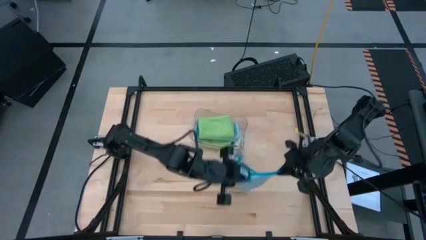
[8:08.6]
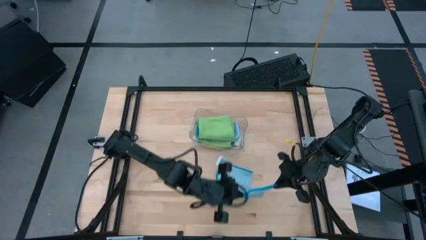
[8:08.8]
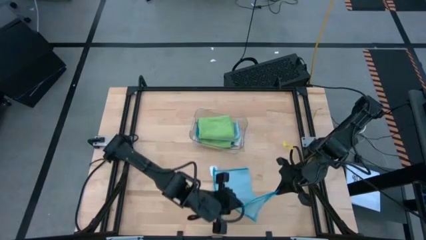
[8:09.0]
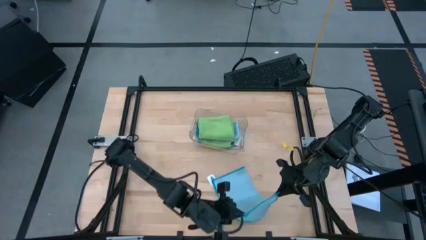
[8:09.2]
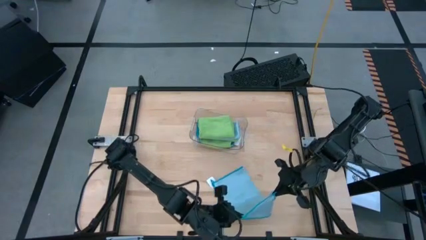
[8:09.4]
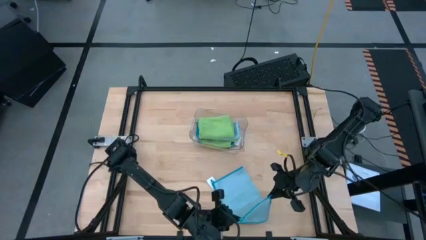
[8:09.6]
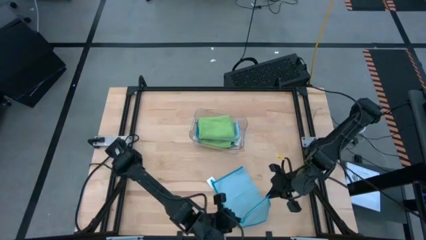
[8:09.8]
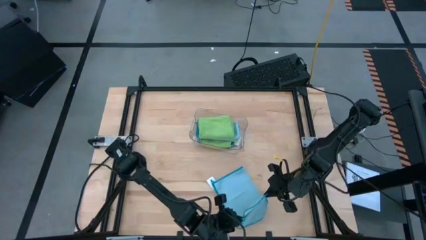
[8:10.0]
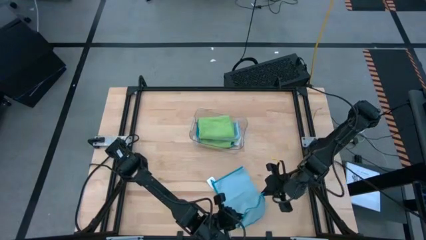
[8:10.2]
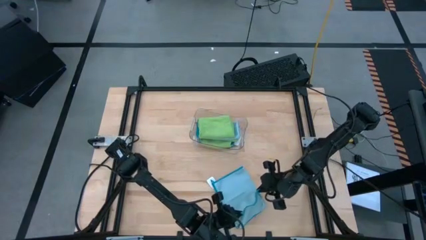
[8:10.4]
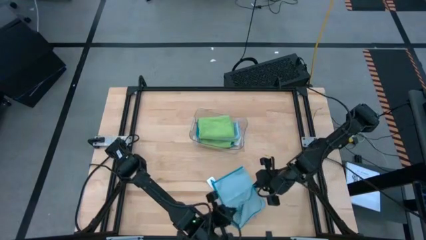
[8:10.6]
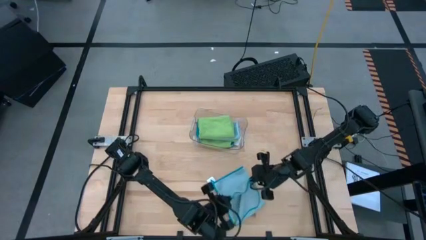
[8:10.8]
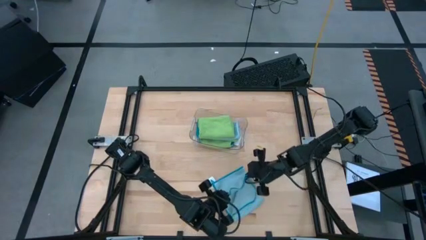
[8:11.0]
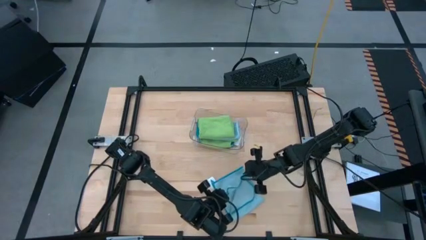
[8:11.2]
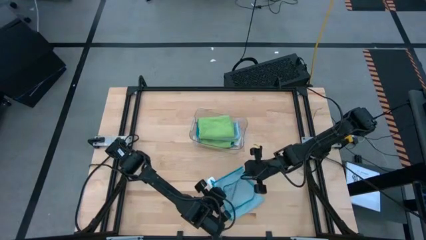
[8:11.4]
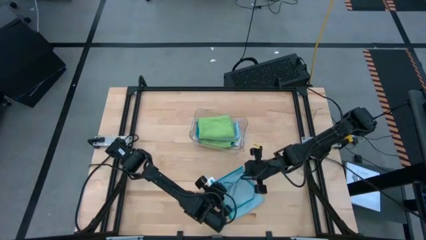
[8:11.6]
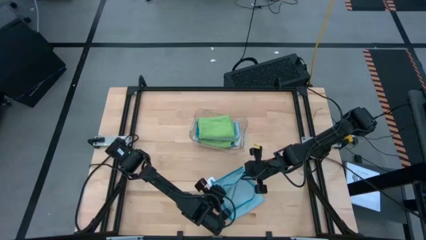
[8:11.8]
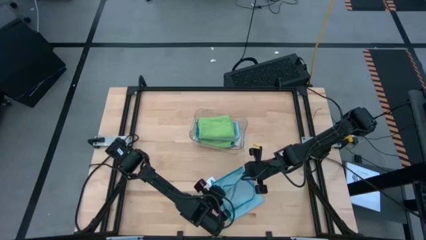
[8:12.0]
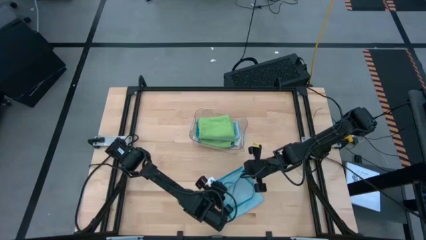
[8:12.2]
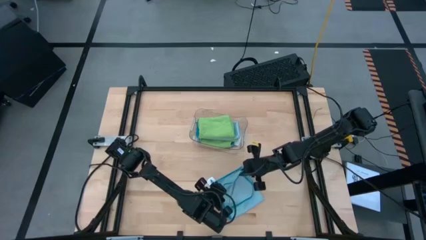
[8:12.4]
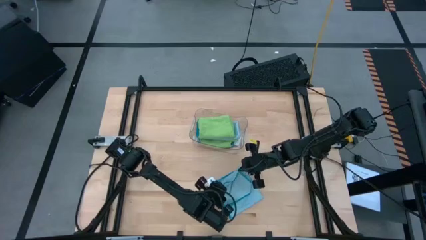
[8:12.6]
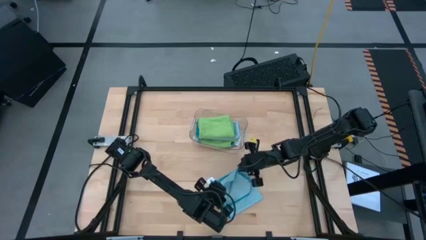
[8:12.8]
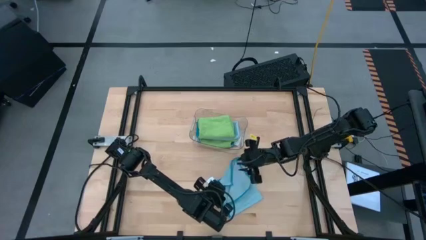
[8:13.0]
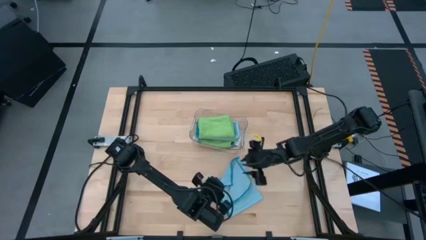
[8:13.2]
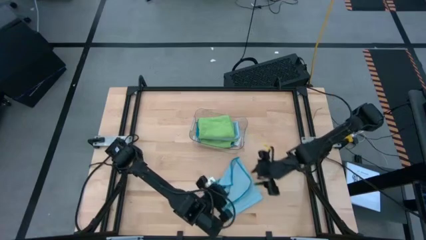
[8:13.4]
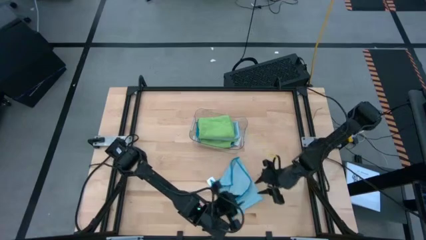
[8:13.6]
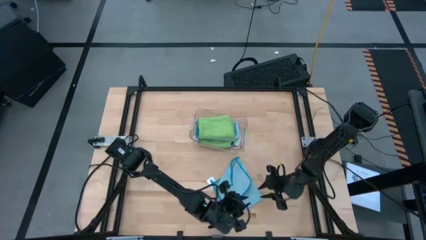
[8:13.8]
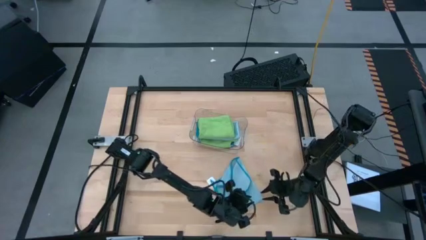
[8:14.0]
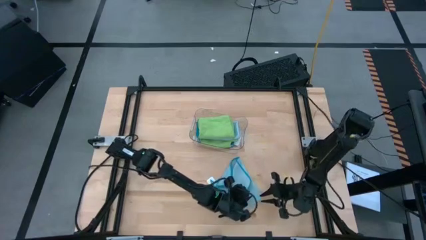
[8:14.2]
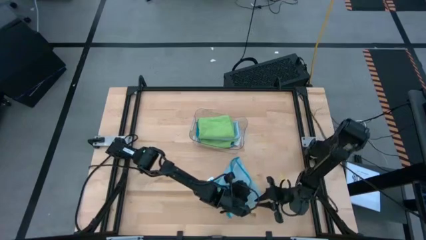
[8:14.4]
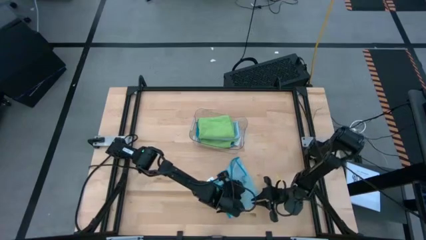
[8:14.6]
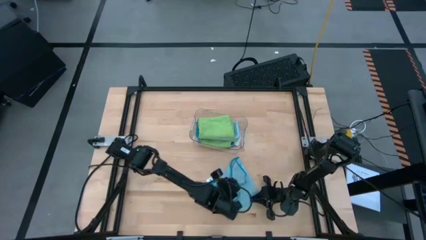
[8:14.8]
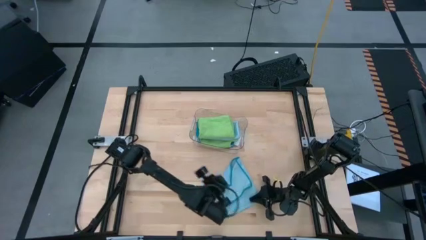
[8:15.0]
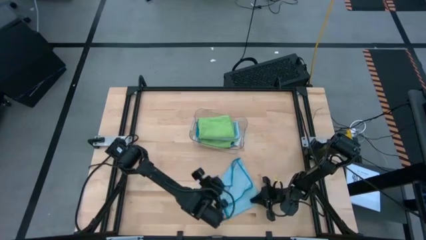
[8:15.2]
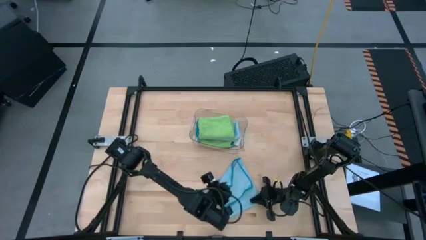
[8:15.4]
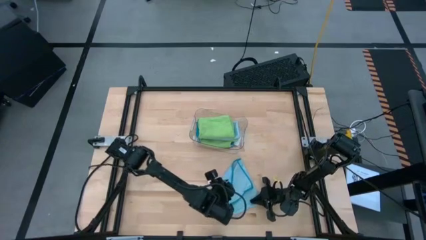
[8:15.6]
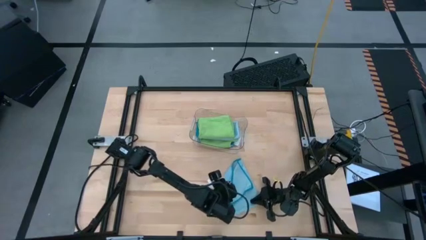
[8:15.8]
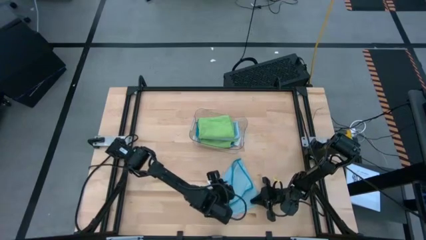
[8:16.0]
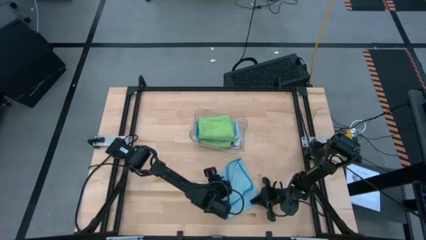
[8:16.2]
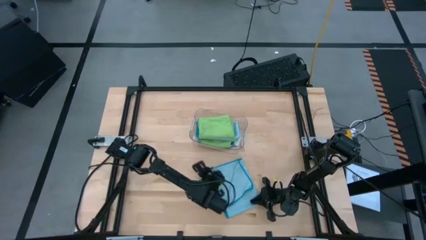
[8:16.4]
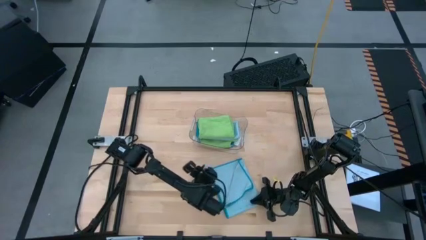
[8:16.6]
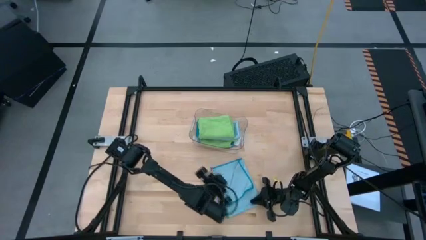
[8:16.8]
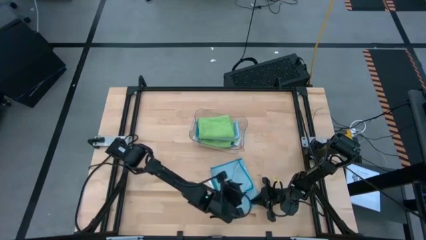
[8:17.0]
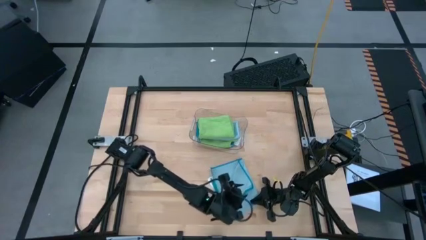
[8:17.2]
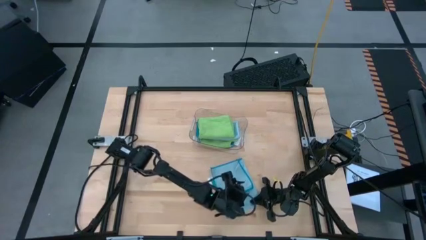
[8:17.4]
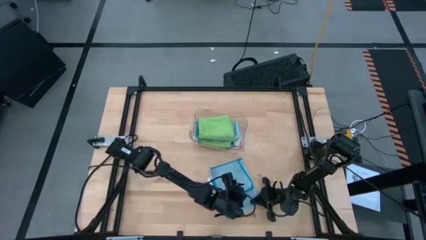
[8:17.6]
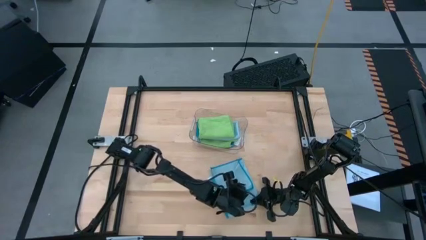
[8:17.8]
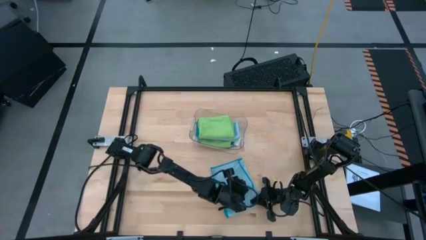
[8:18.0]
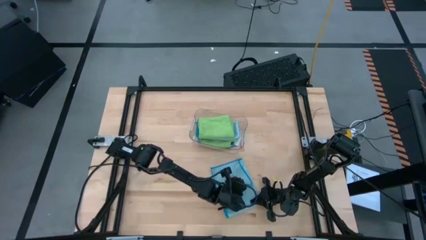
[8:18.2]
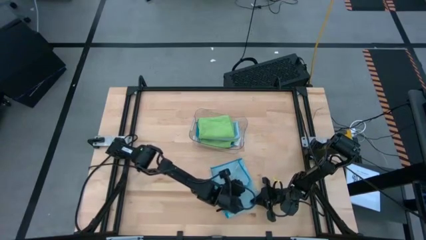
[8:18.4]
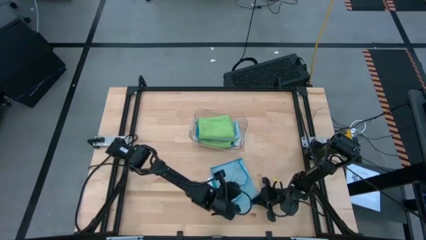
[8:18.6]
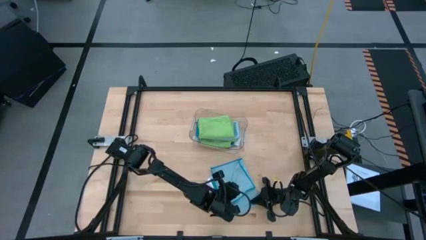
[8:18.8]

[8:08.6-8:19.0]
Task: Fold microfiber towels
Fold the blue microfiber cloth

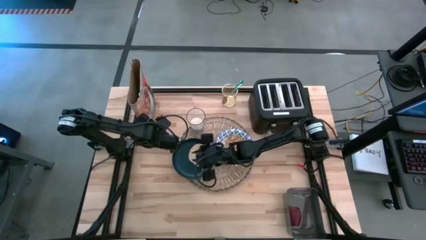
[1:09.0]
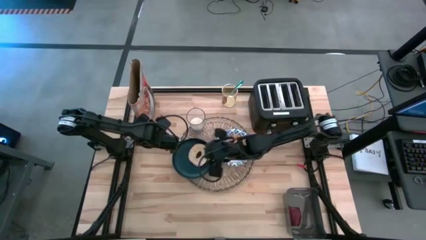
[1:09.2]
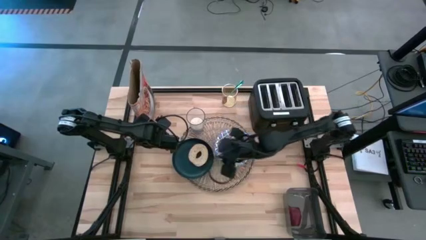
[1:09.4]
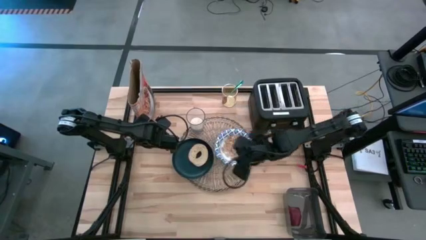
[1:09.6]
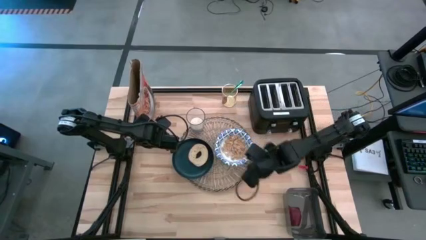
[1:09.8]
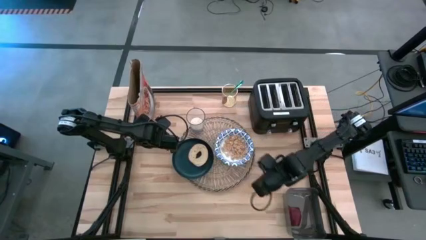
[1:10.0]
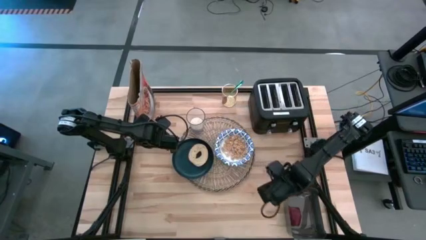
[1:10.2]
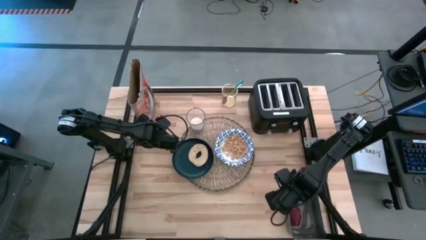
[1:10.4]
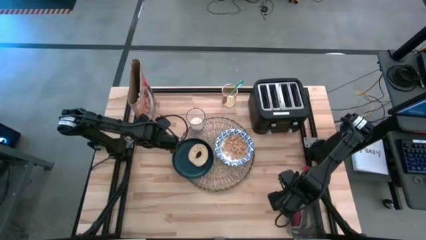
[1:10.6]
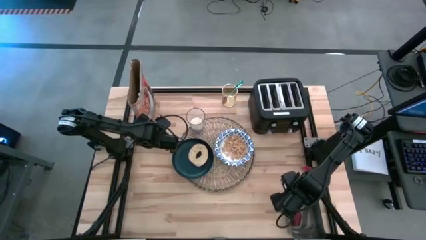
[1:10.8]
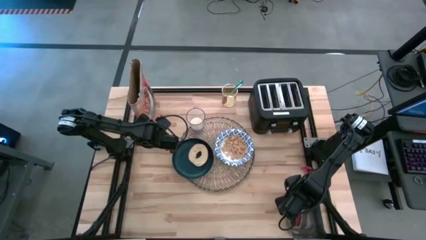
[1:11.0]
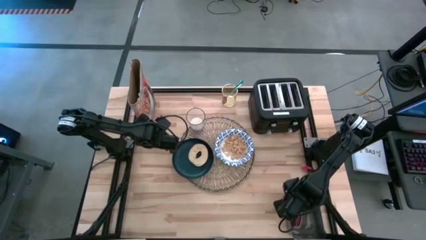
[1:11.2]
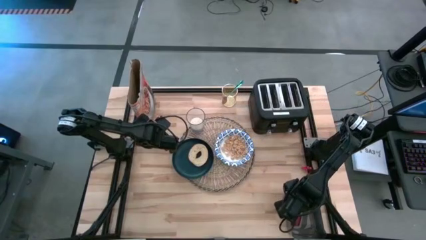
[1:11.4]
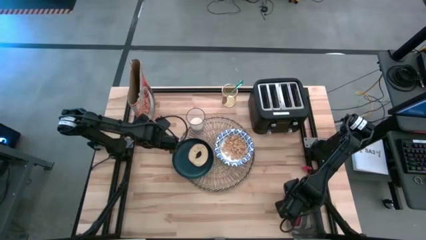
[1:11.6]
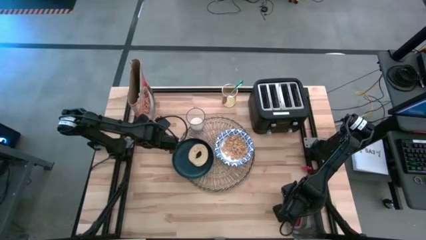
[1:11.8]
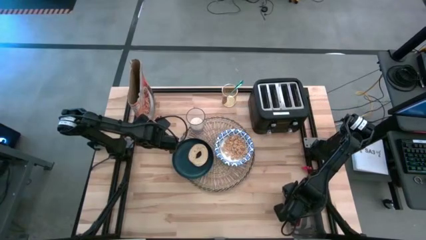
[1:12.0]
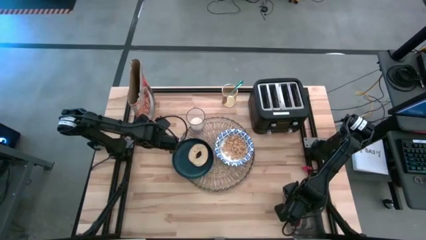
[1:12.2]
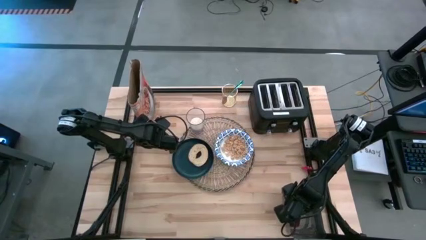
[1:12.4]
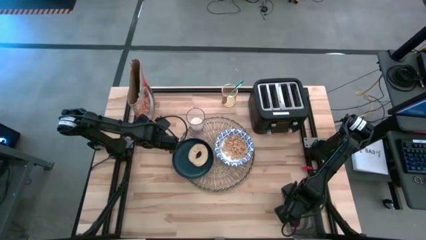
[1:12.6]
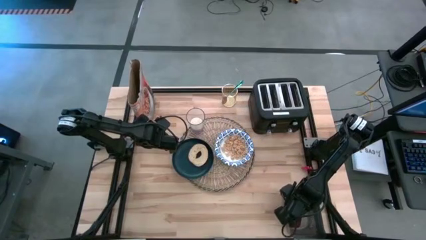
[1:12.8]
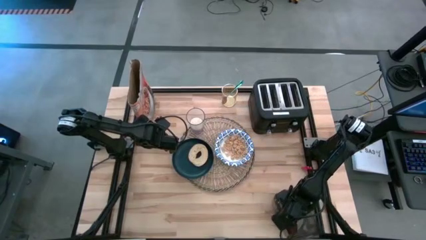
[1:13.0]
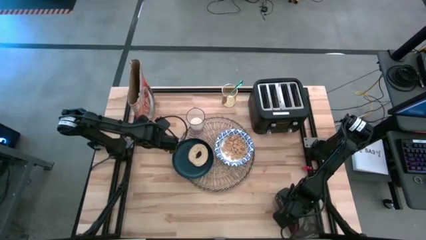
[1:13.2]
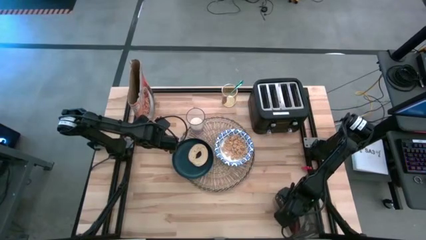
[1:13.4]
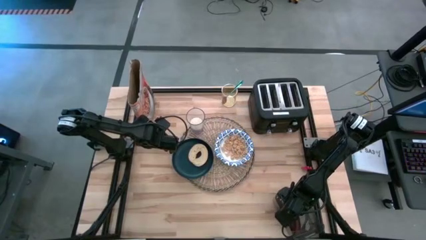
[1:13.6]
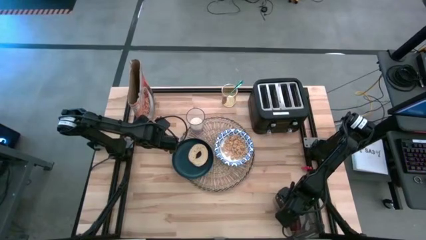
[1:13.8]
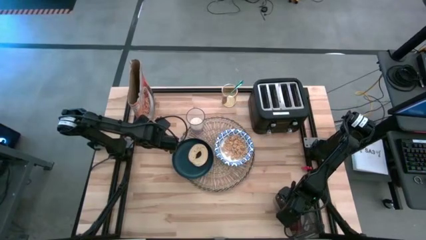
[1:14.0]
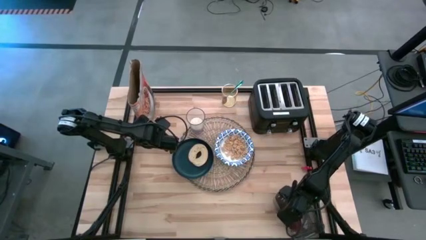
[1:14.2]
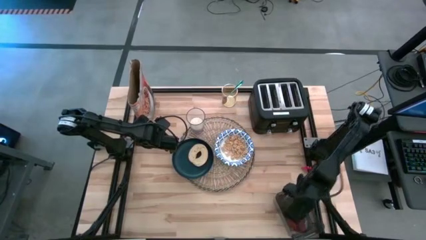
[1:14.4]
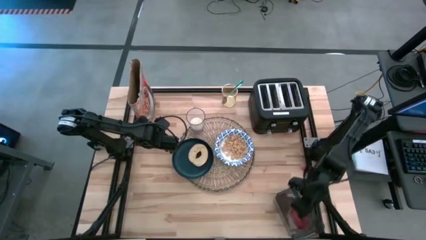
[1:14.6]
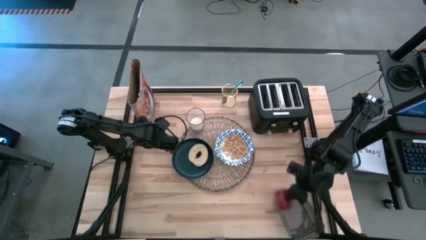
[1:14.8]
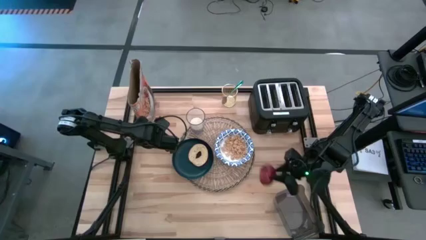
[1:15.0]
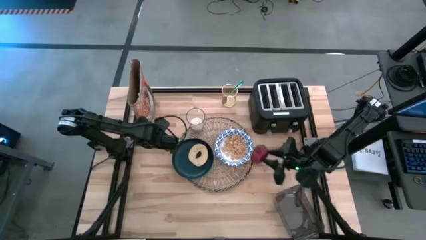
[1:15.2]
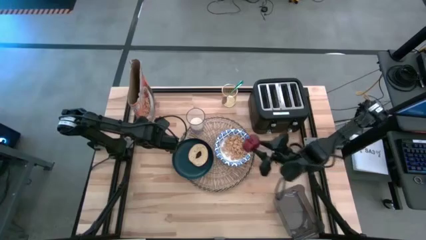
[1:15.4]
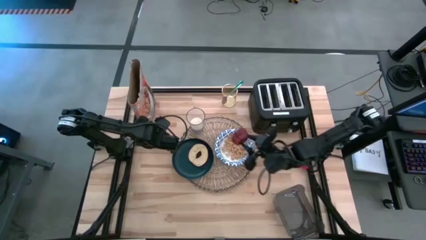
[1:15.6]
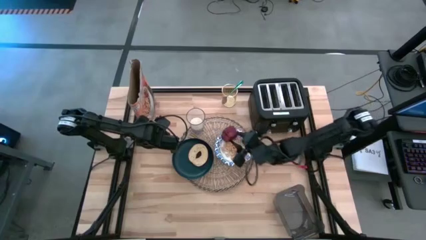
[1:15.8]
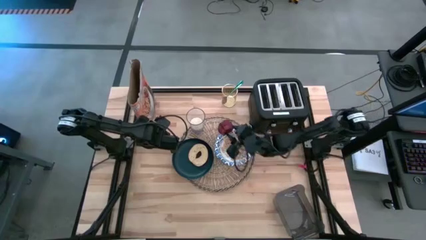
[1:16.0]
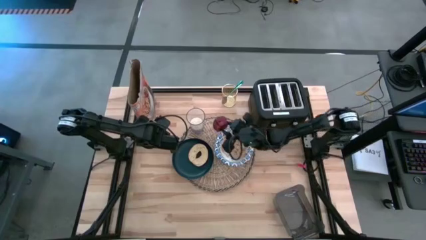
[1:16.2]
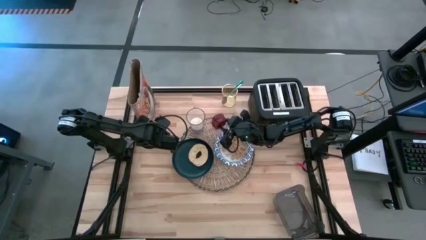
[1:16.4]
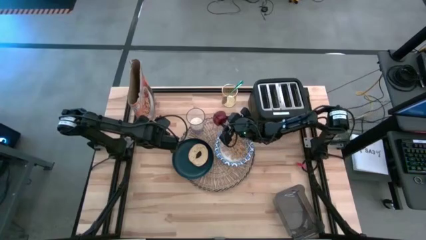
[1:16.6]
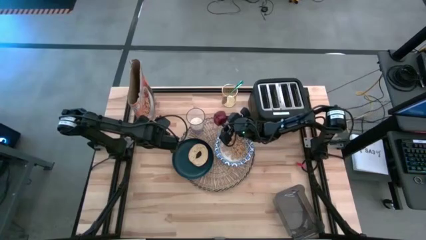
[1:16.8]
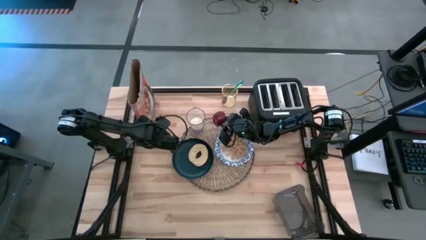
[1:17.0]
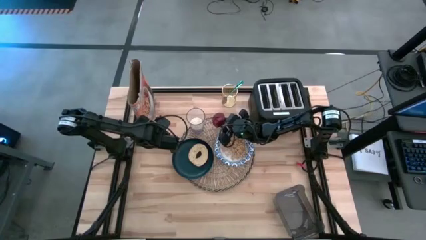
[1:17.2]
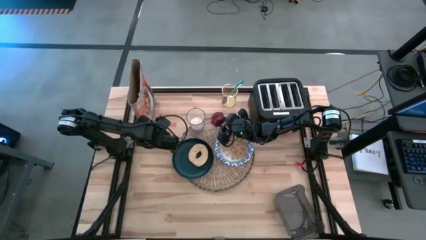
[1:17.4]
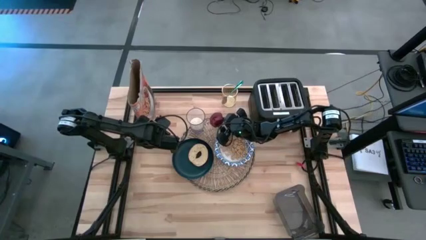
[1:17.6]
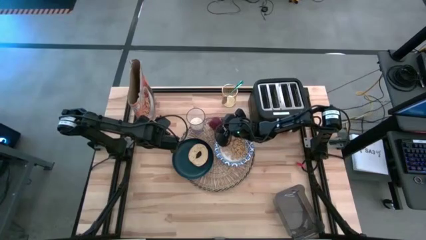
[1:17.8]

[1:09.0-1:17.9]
Task: Arrange a breakfast setting
Put the apple from the transparent bin to the left of the transparent cup of milk on the brown placemat
